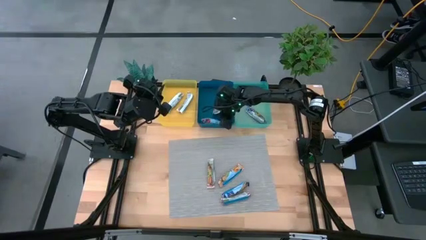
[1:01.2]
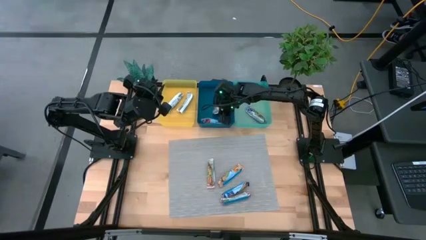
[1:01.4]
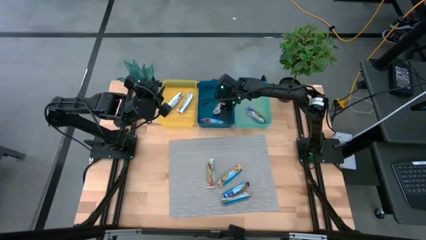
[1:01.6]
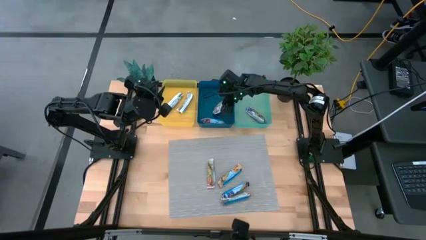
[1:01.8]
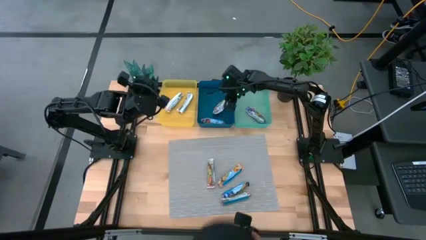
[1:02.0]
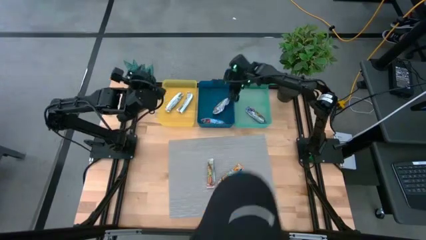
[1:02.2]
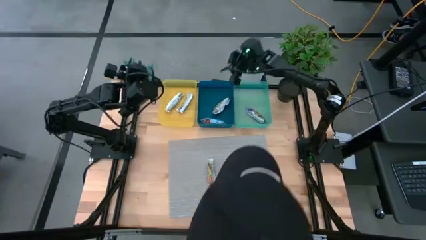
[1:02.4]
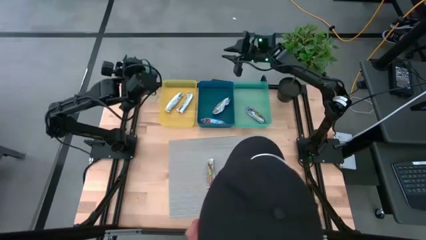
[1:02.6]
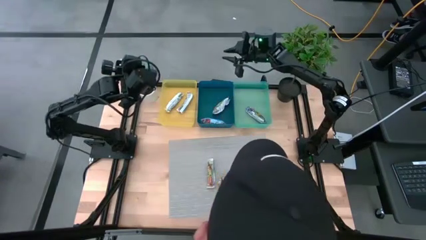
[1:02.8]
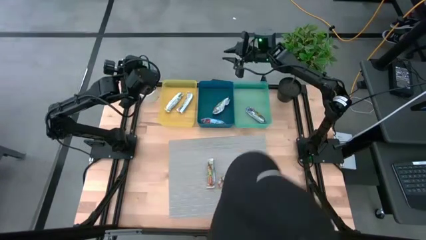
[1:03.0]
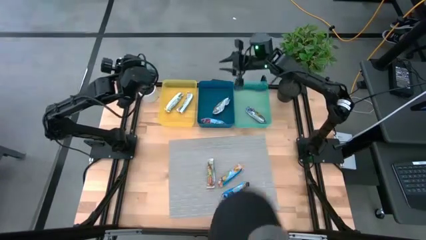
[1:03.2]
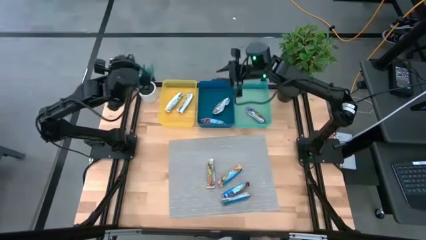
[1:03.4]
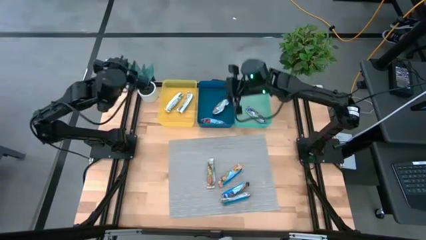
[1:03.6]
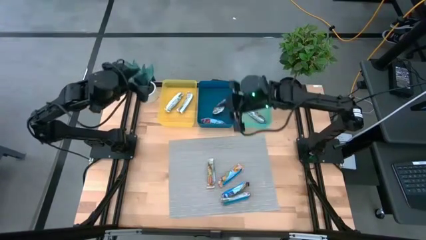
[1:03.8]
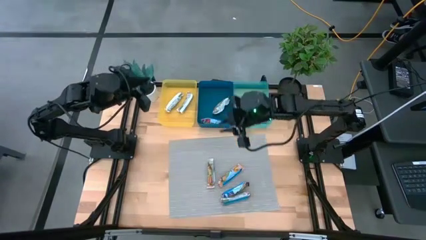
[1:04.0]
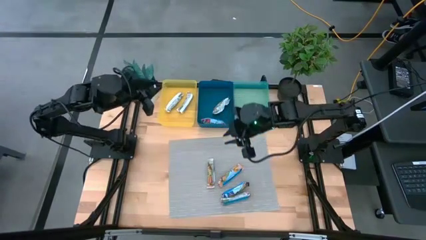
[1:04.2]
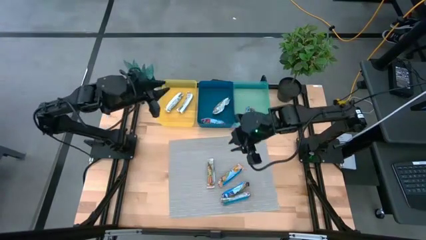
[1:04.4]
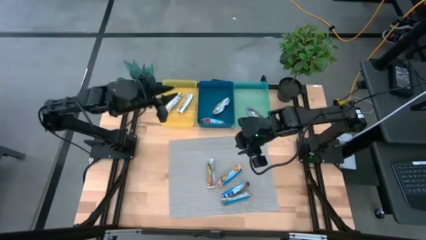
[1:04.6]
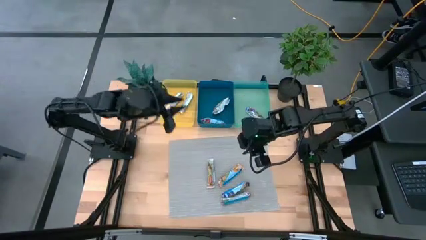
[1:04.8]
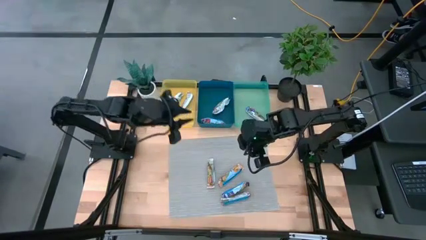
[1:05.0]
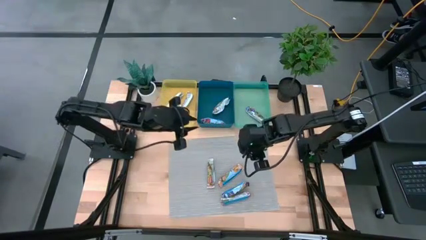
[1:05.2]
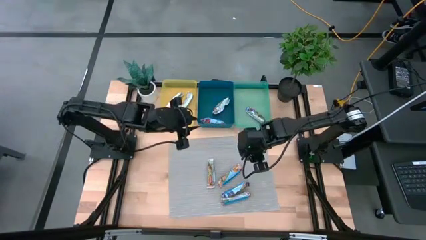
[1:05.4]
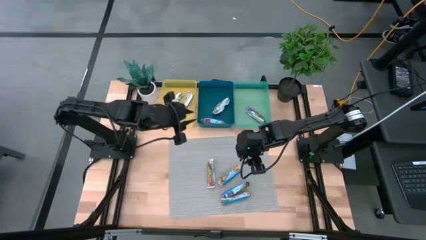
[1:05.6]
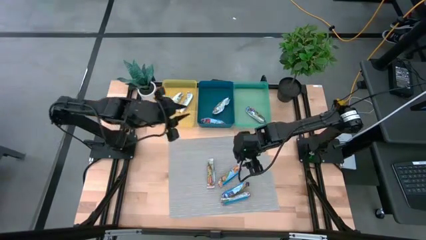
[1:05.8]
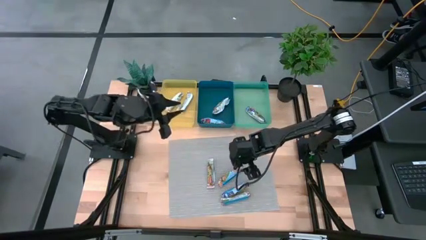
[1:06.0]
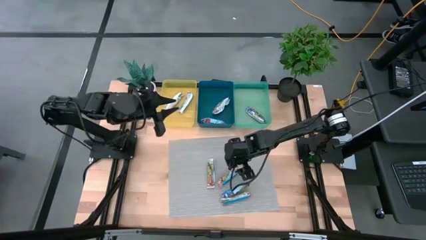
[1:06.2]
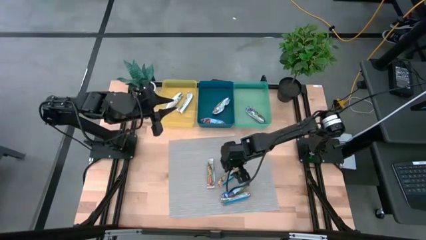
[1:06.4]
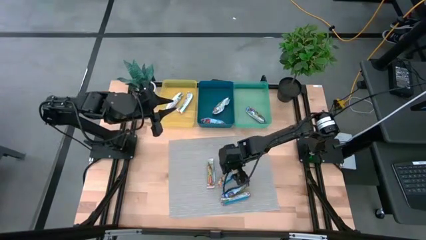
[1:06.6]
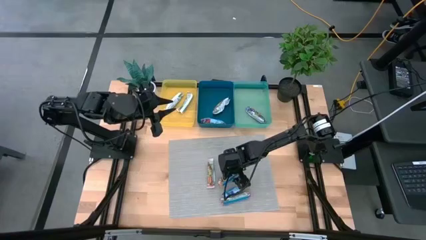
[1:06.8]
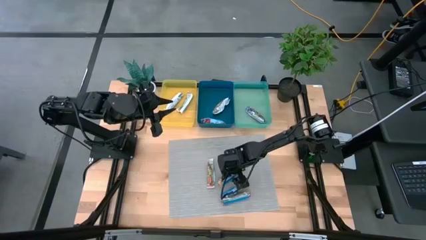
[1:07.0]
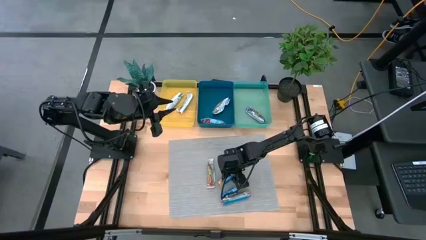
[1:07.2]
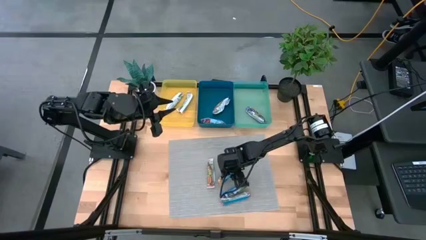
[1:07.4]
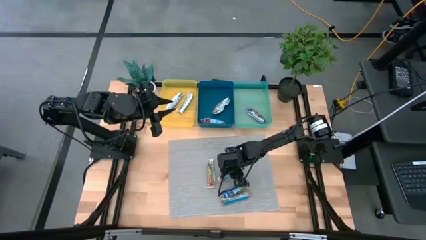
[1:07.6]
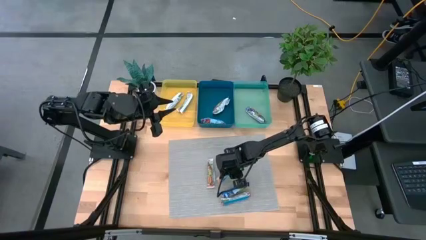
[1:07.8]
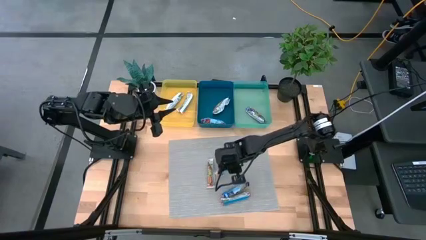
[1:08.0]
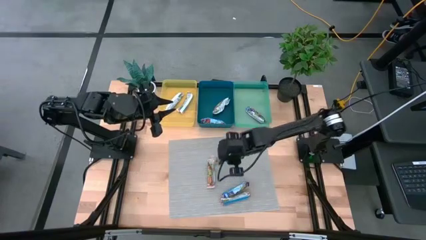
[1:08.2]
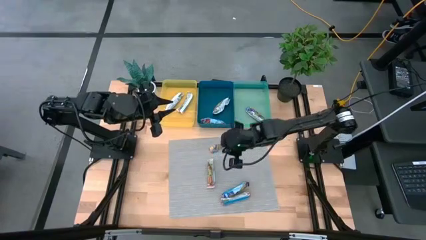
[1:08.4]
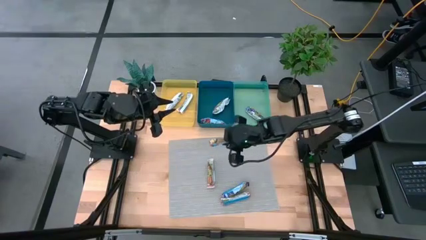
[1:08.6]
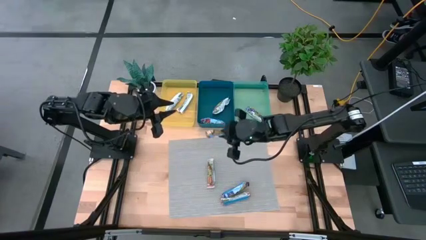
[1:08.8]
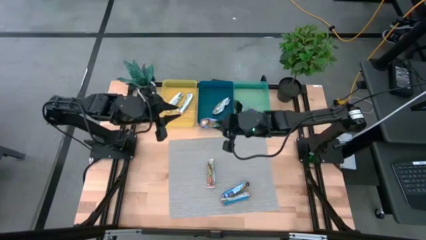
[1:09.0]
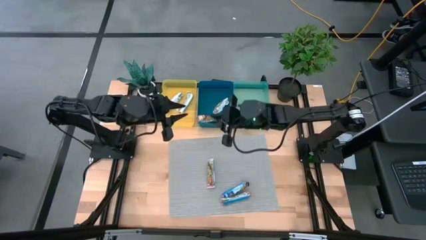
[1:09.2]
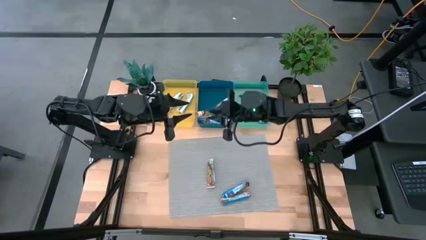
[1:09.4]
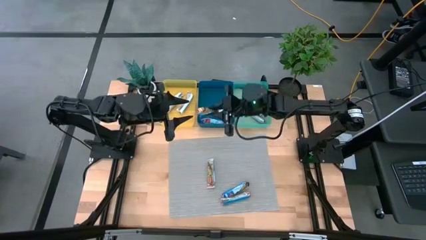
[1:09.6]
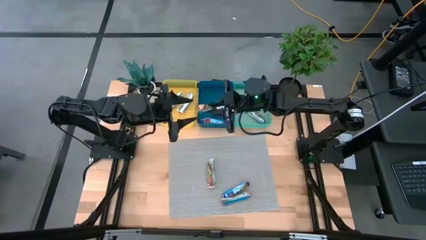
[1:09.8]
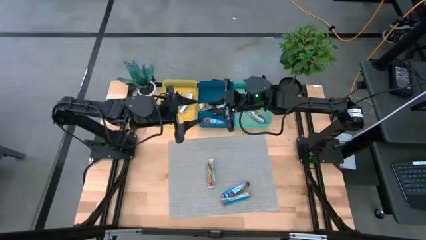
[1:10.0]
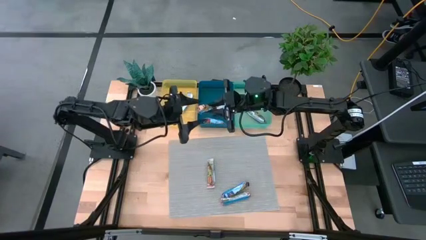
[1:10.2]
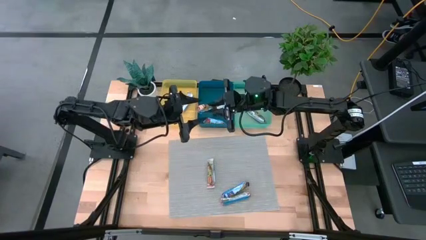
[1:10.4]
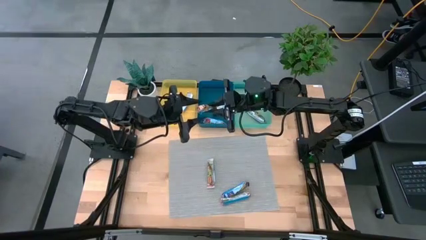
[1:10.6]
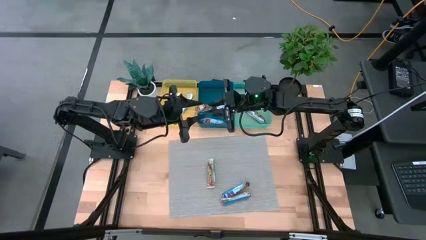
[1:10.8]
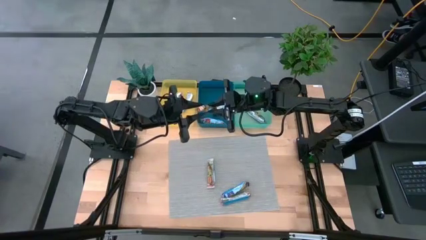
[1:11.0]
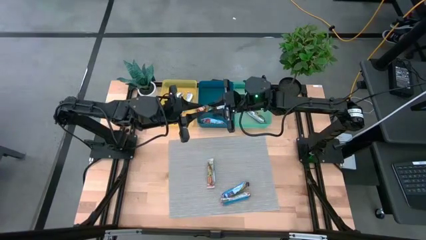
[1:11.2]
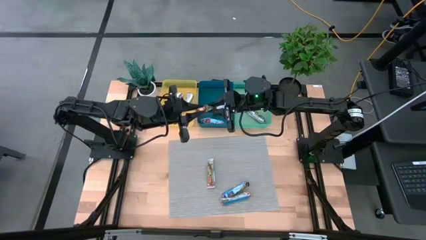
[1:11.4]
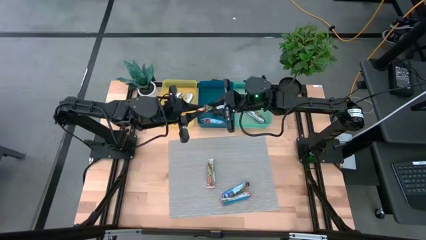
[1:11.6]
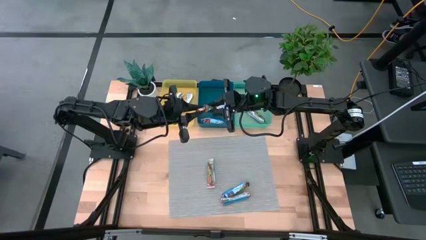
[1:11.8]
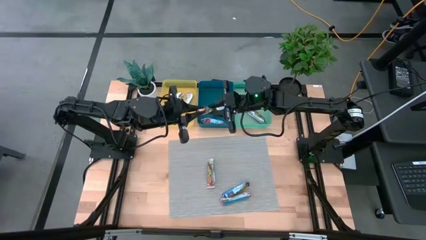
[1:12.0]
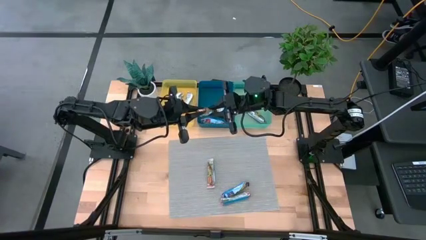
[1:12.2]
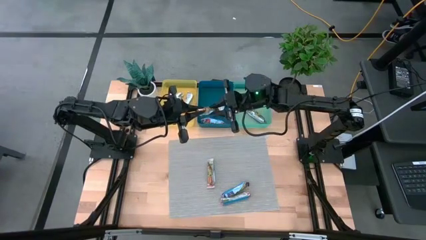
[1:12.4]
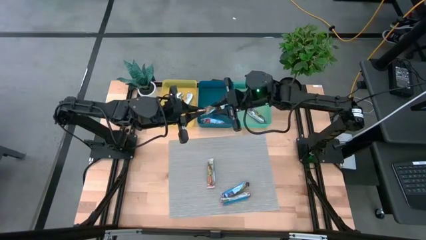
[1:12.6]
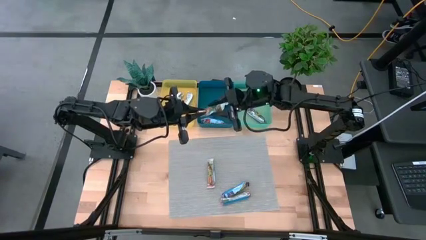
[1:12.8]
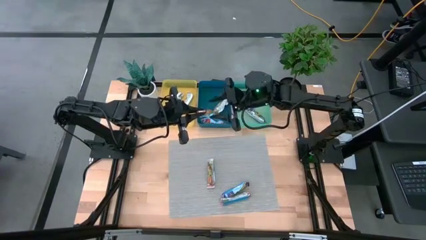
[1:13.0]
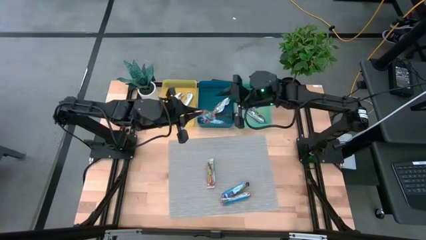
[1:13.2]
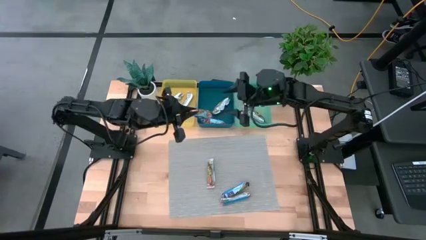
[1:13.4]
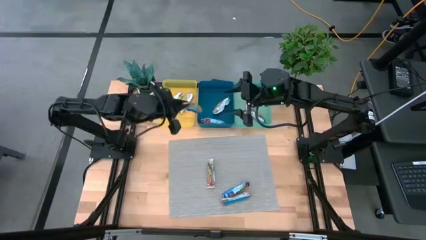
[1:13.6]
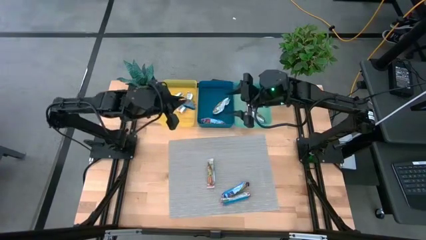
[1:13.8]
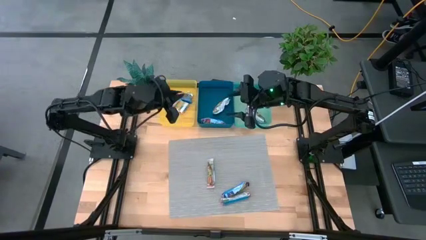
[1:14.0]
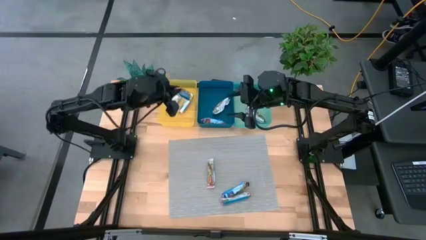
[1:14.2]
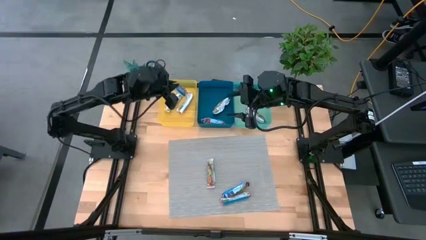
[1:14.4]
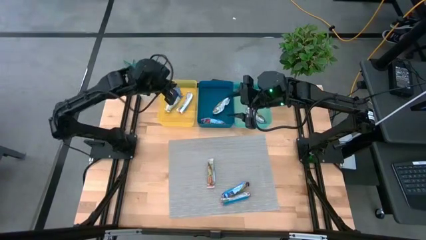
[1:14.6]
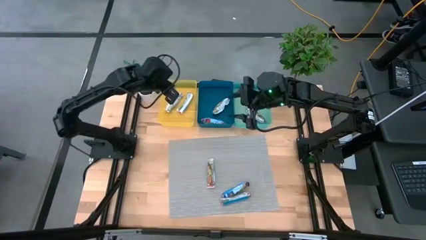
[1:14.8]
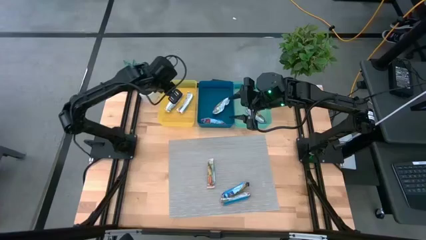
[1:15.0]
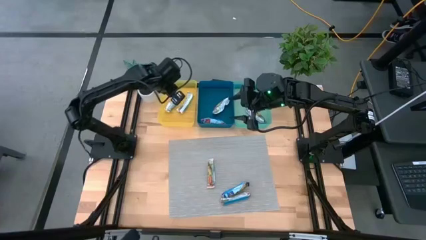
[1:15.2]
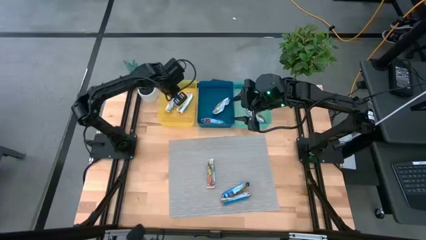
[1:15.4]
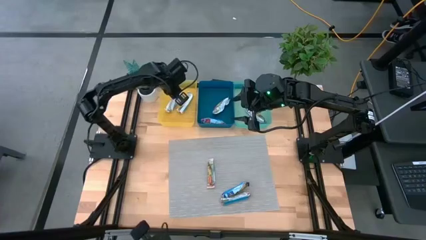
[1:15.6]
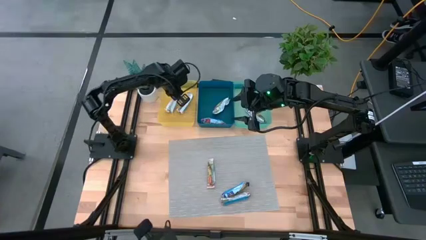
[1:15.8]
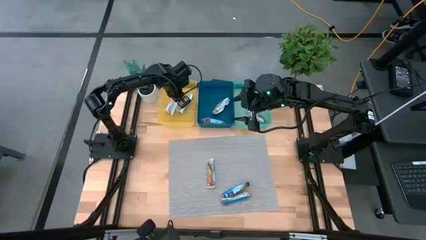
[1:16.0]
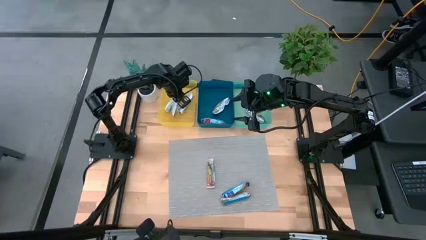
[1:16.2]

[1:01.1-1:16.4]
Task: Pick and place Granola Bars by type
Put the yellow granola bar into the yellow bin
